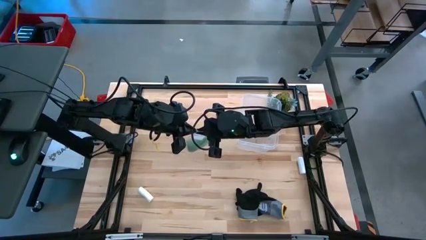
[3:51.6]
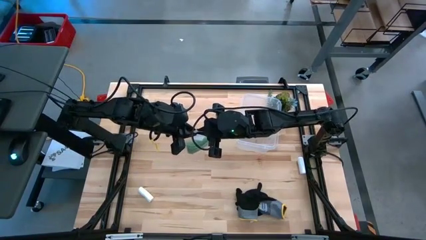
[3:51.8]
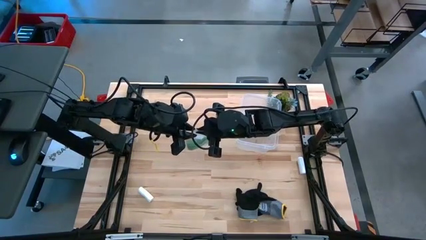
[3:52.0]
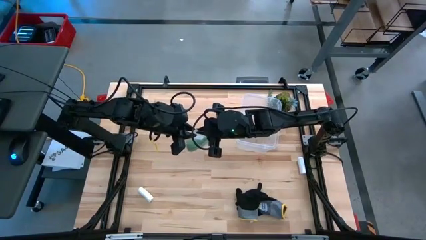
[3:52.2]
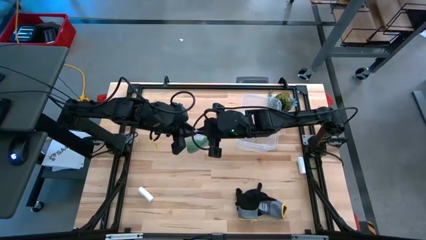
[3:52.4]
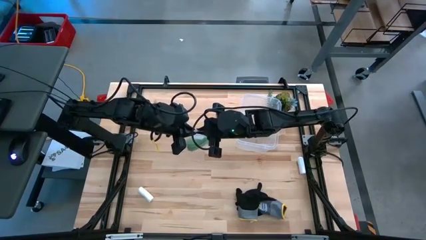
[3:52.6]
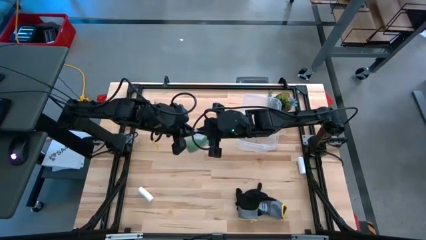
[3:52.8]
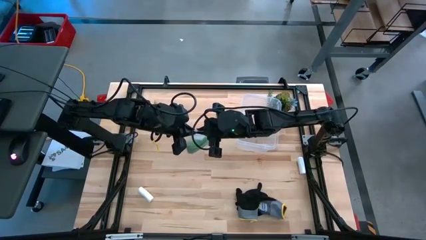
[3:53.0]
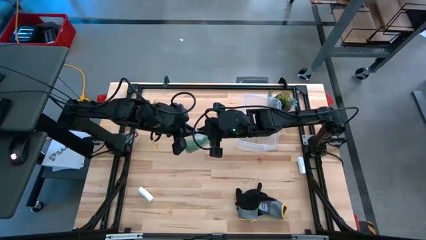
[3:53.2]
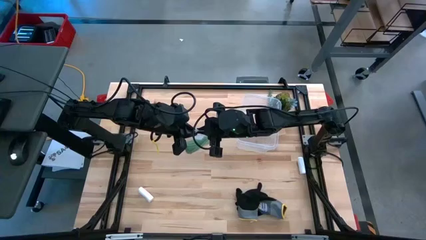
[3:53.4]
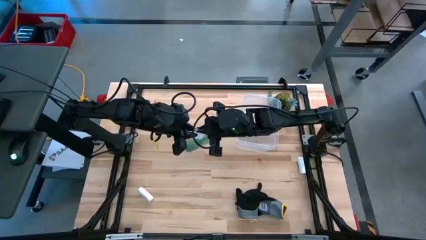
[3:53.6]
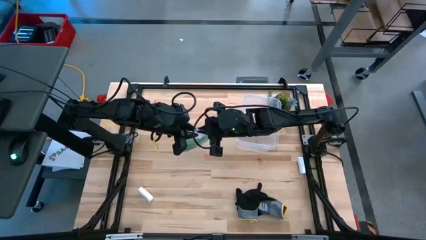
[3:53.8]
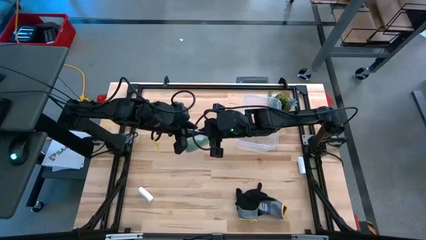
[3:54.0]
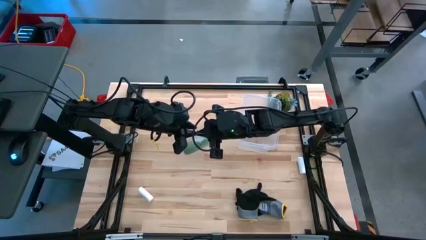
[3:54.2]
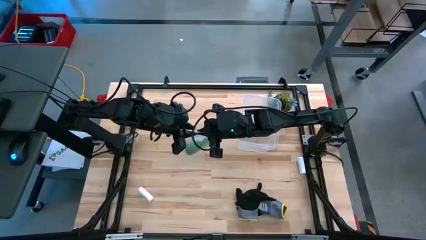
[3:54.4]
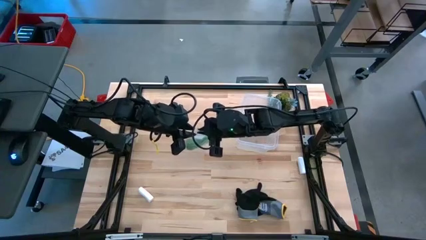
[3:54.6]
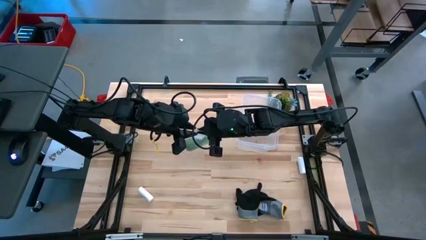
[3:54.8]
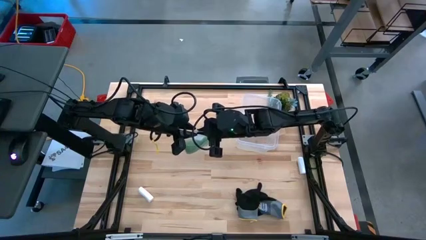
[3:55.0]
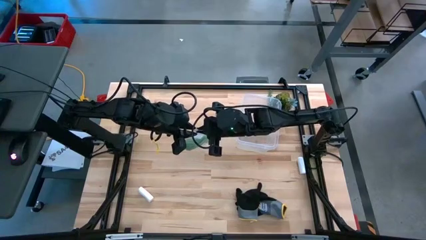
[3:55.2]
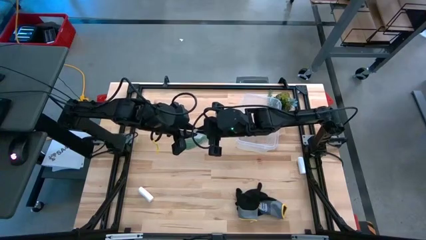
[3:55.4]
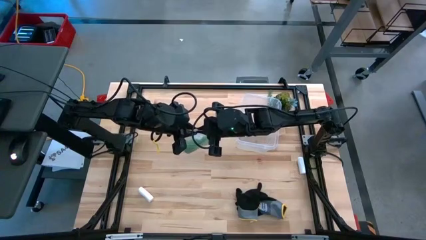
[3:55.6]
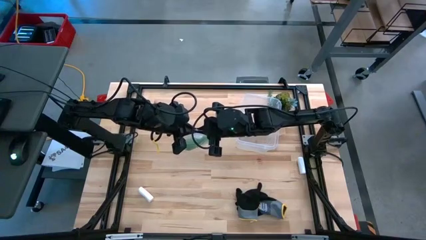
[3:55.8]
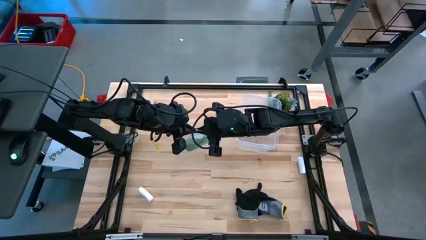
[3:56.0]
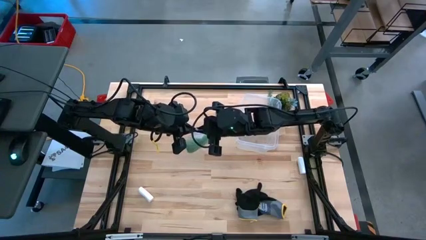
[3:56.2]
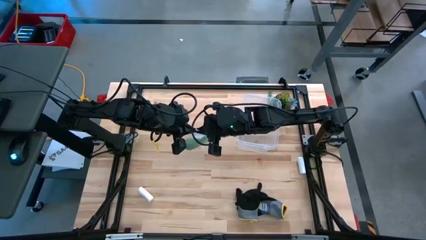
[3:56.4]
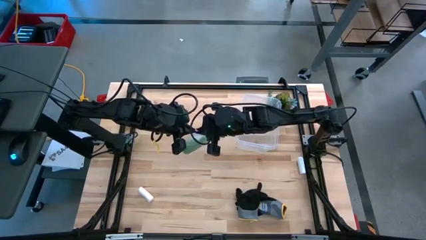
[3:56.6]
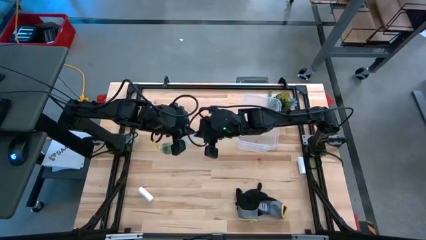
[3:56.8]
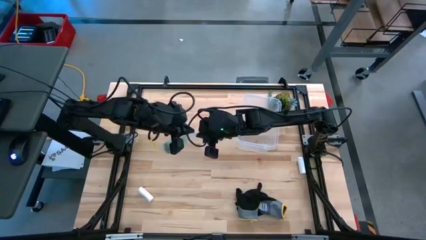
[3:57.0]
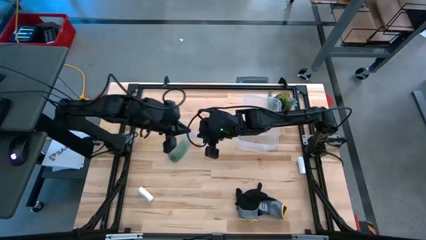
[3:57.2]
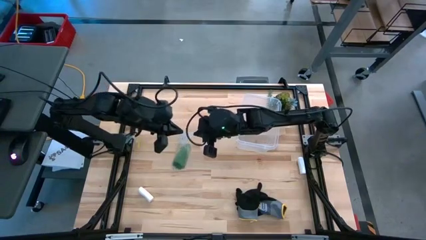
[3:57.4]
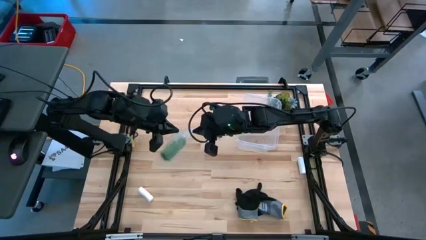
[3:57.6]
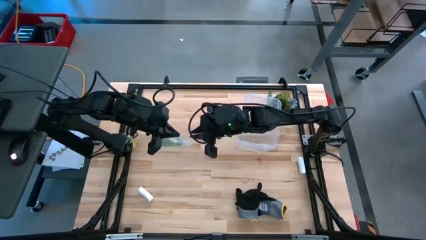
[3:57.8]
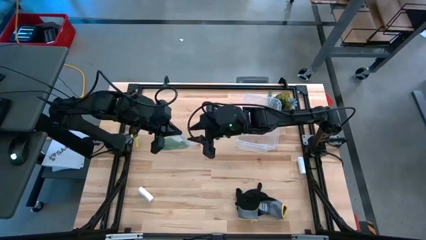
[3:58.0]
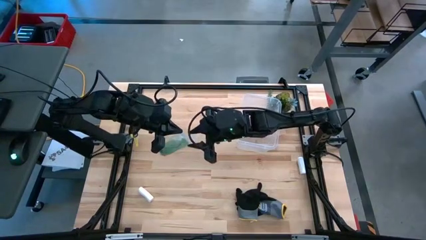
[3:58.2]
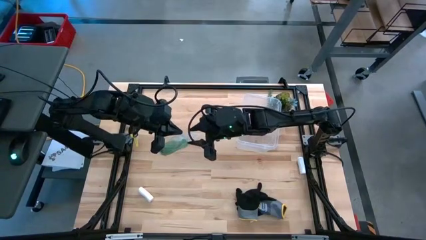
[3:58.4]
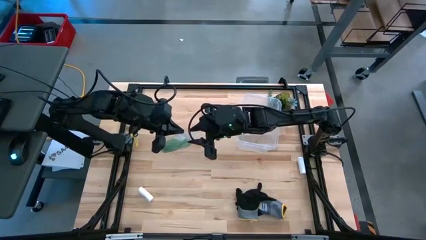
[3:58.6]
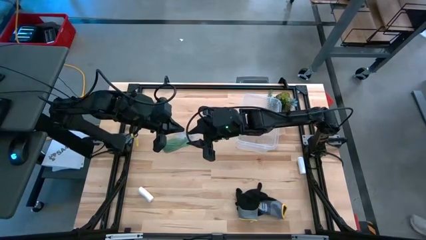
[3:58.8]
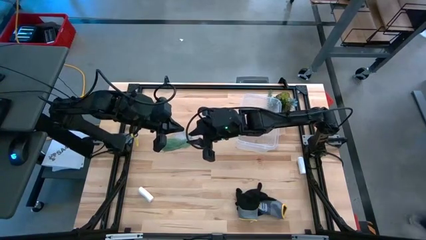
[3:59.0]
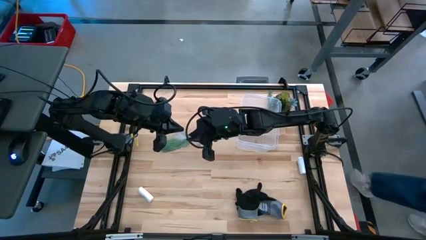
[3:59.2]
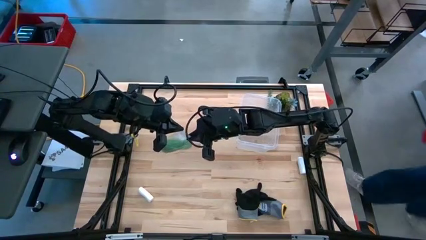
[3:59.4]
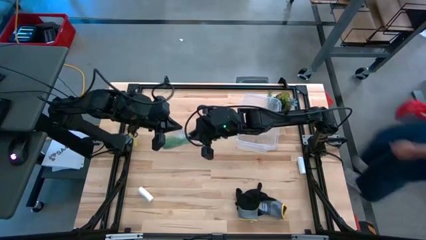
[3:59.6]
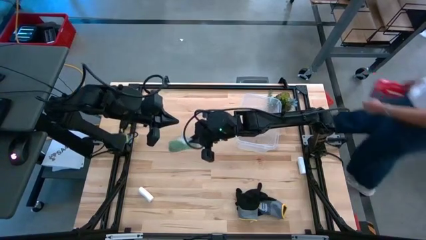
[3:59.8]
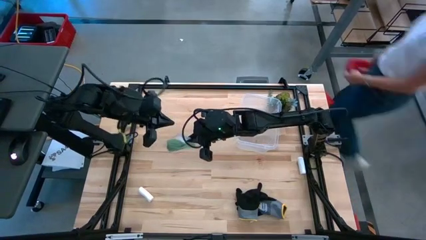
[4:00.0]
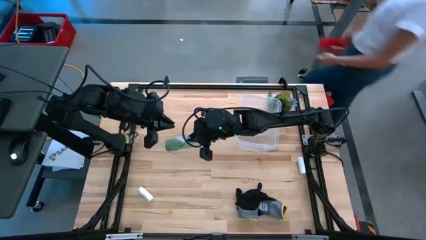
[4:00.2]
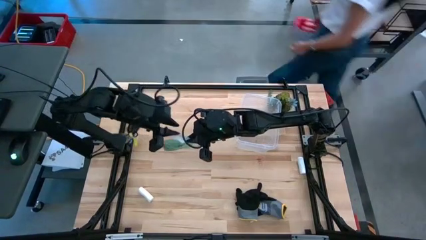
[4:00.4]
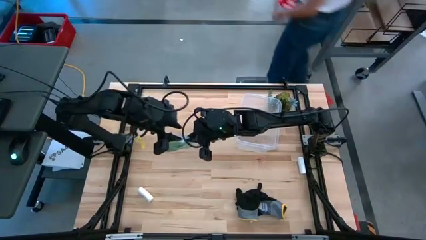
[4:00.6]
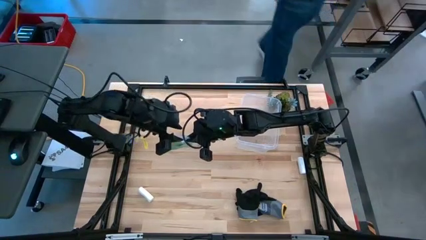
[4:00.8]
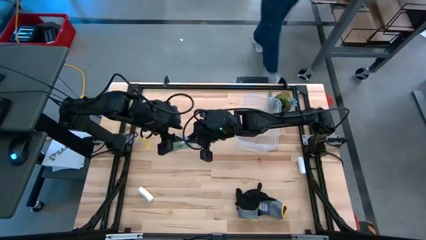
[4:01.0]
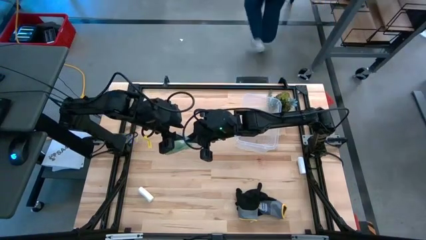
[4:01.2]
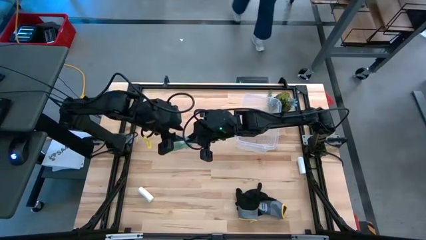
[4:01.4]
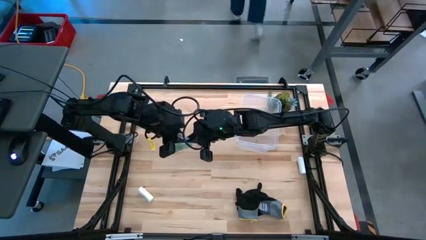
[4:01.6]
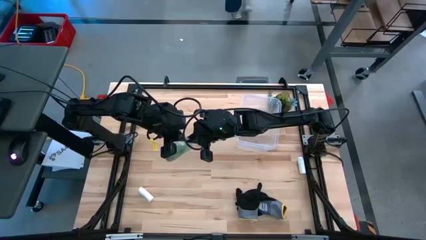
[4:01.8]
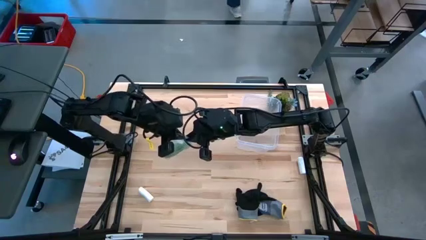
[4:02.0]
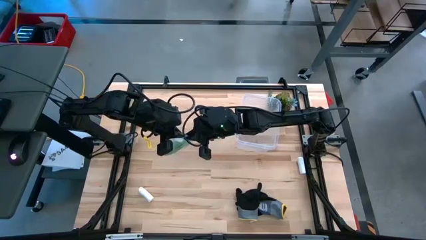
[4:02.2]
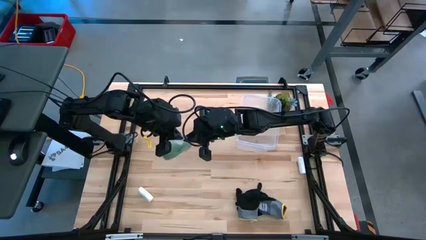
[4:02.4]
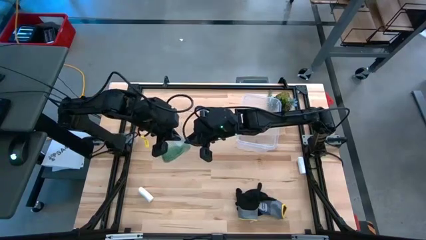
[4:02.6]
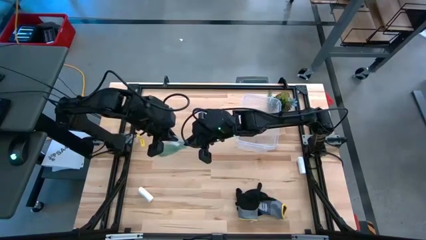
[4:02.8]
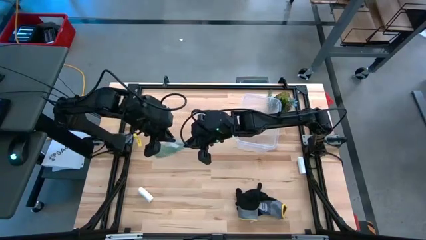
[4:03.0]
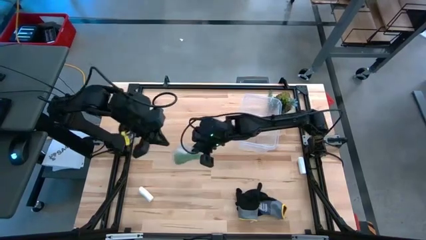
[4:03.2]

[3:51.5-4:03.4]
Task: Roll bandage
Close the transparent zip bag

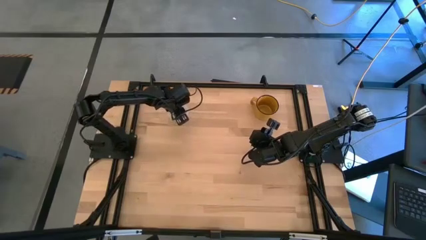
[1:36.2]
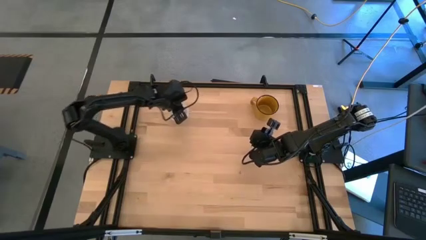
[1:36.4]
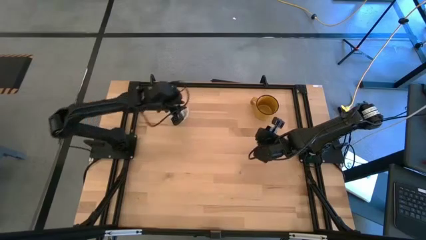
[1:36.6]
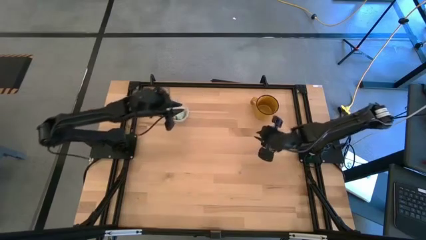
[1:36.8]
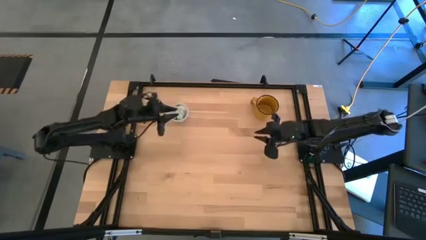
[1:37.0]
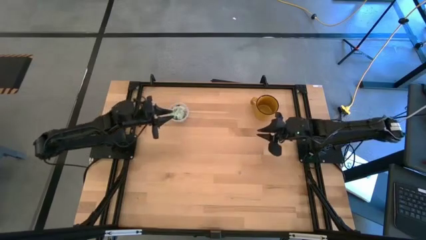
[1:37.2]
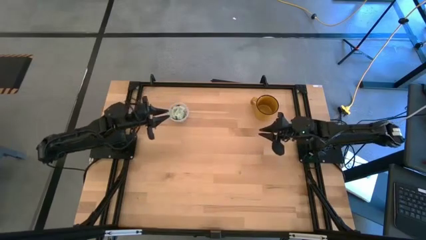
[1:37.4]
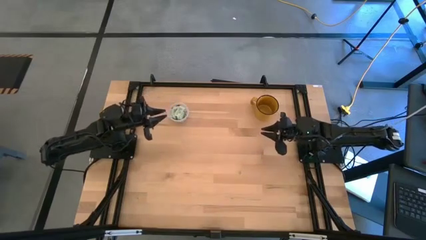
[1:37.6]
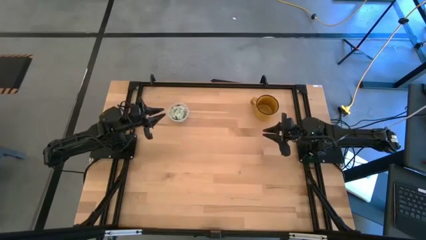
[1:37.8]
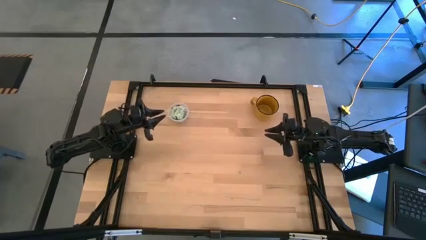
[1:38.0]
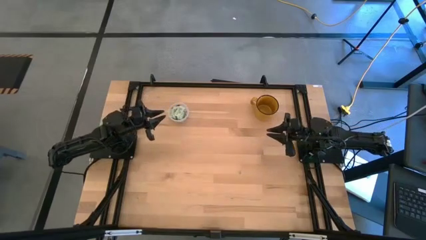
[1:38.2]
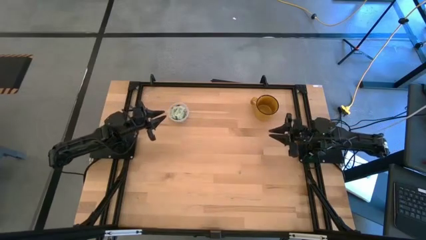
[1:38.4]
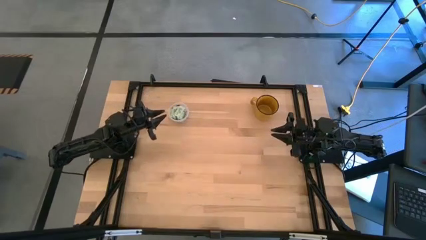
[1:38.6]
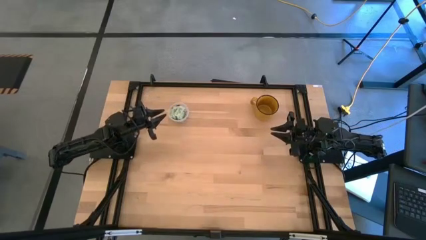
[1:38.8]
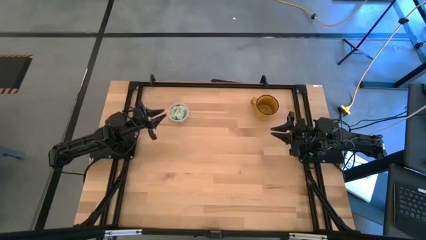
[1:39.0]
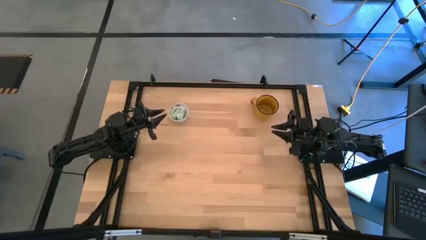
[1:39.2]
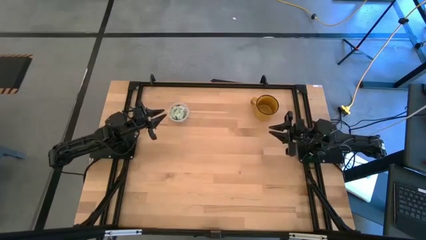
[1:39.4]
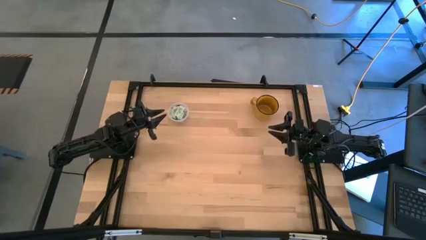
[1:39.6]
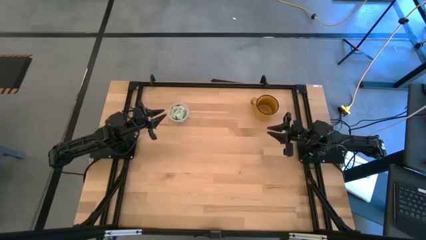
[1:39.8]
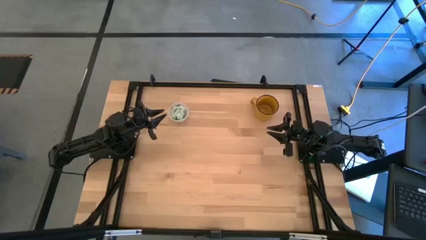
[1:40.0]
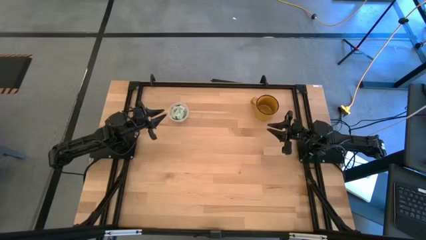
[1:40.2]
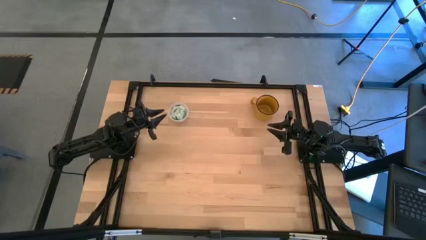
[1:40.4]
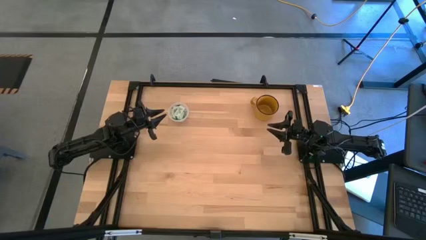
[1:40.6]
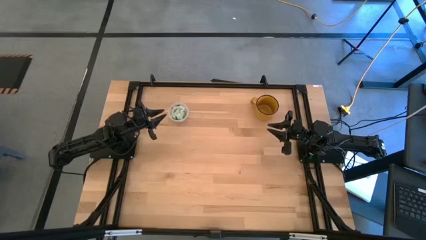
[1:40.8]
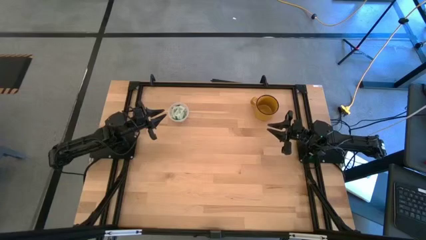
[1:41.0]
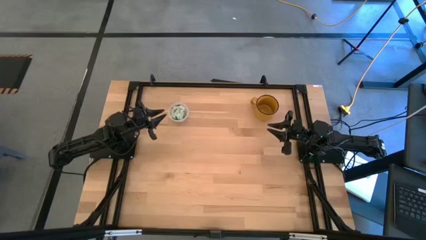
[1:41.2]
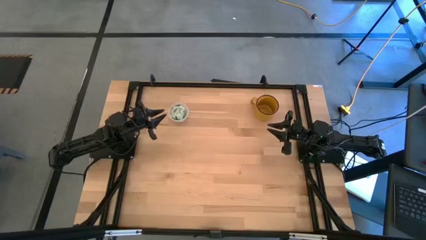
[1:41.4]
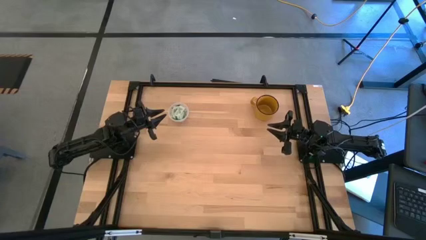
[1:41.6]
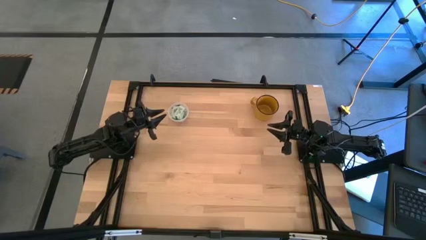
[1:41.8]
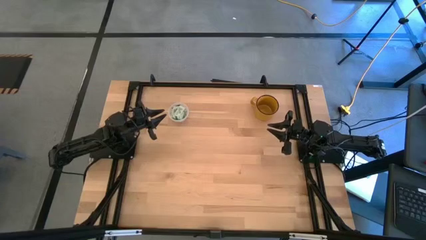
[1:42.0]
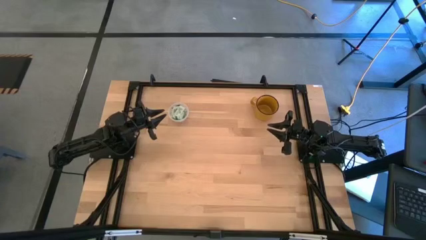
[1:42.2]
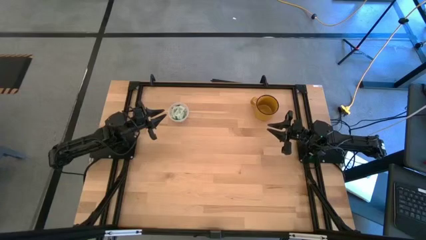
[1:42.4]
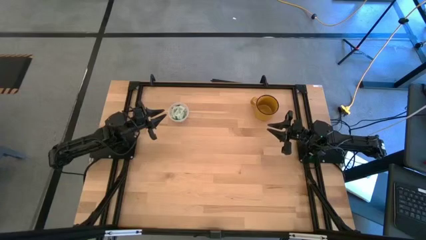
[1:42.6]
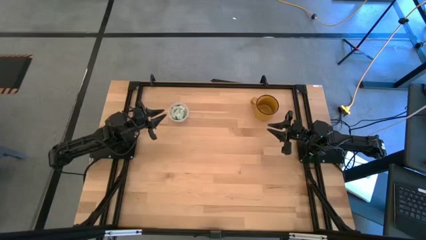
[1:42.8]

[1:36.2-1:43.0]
Task: Pick and place Stevia / Truvia into bins
Return to Home Position
